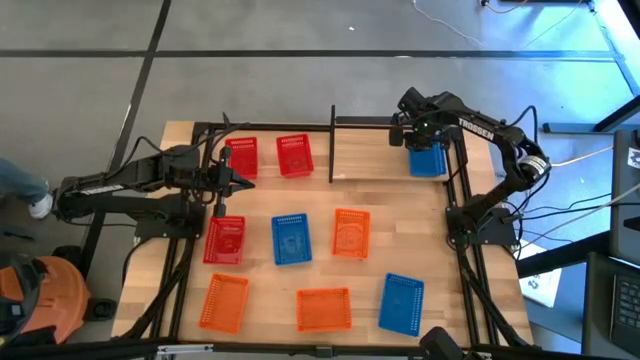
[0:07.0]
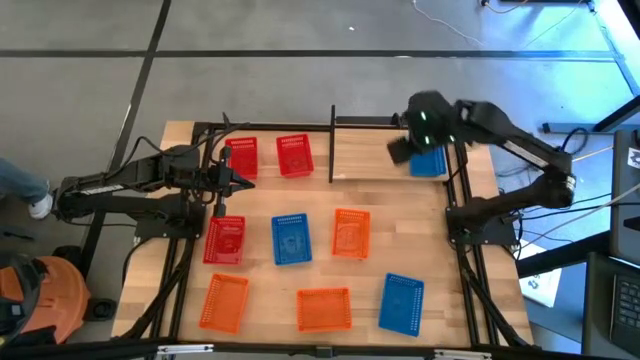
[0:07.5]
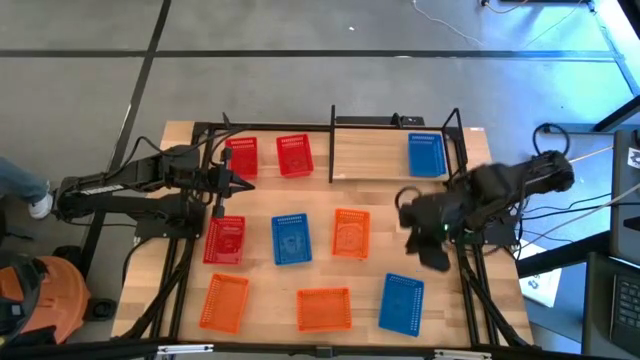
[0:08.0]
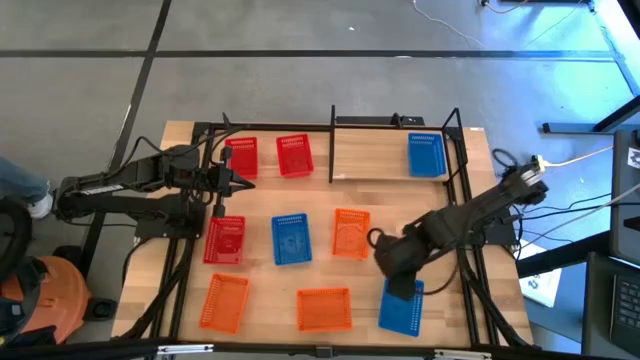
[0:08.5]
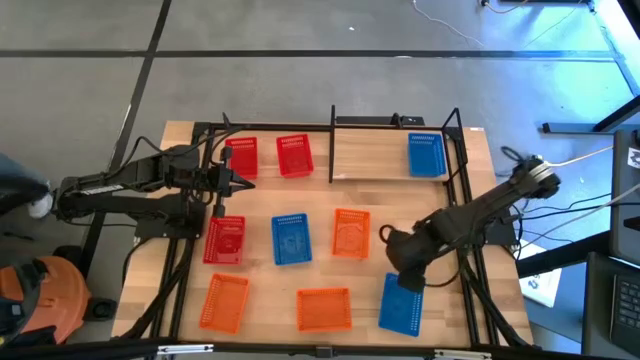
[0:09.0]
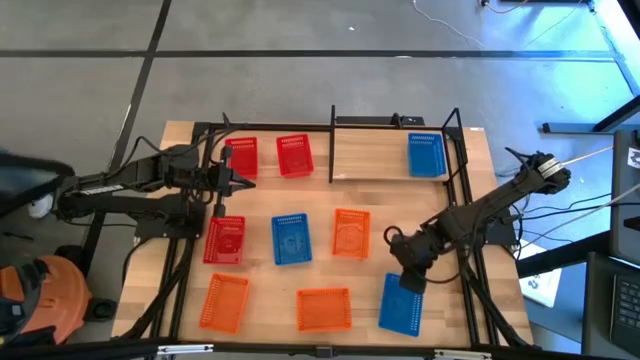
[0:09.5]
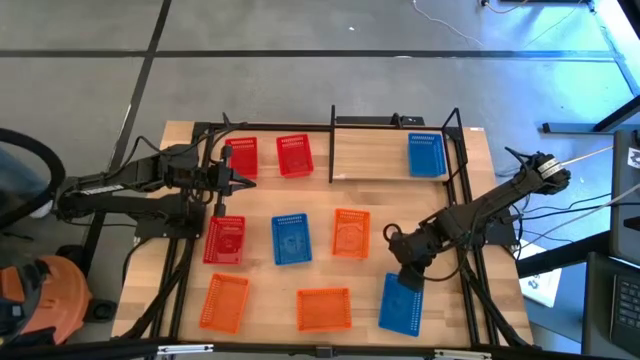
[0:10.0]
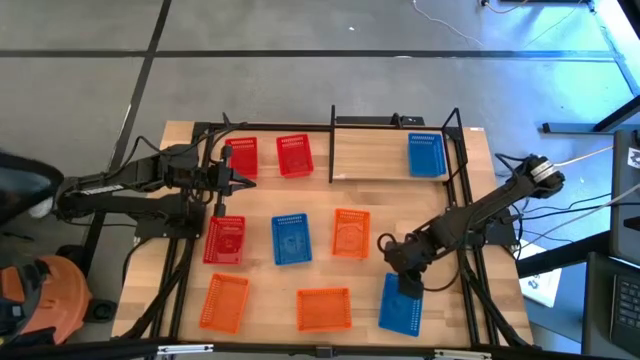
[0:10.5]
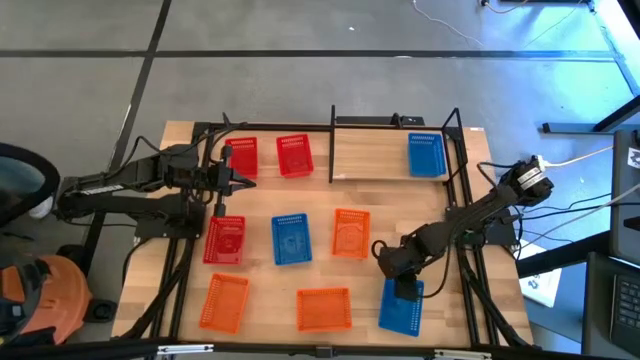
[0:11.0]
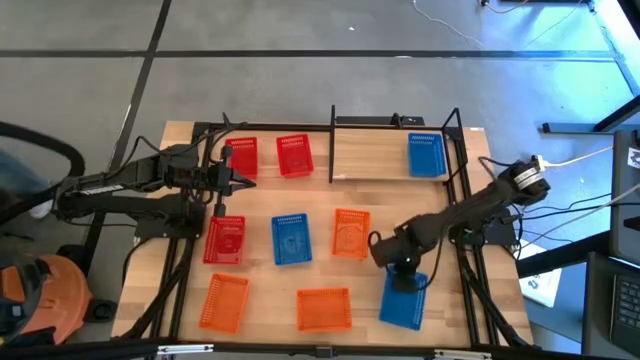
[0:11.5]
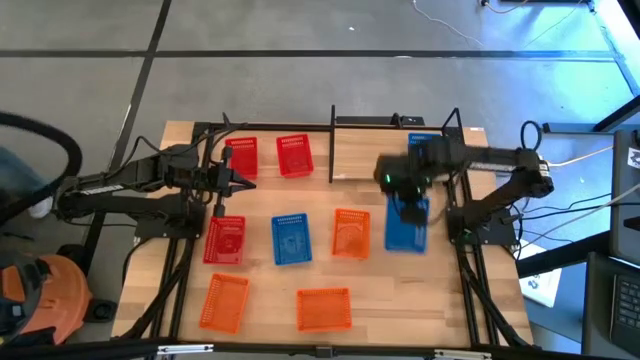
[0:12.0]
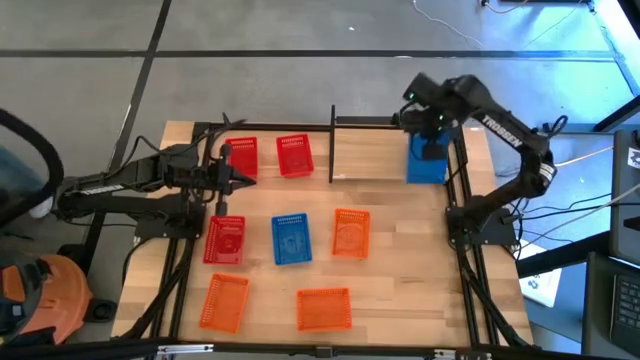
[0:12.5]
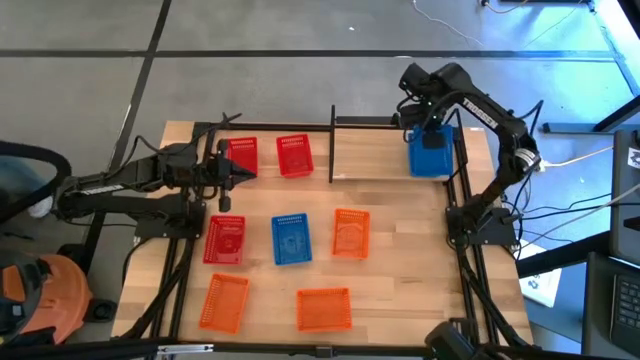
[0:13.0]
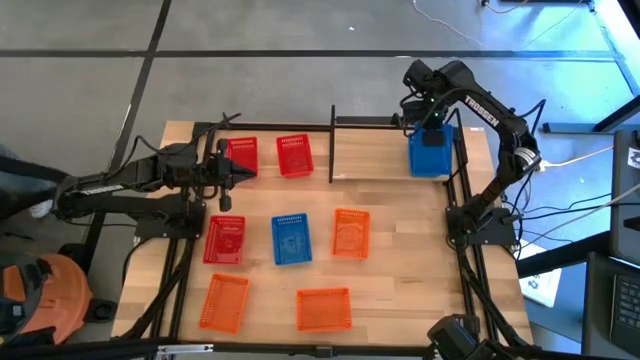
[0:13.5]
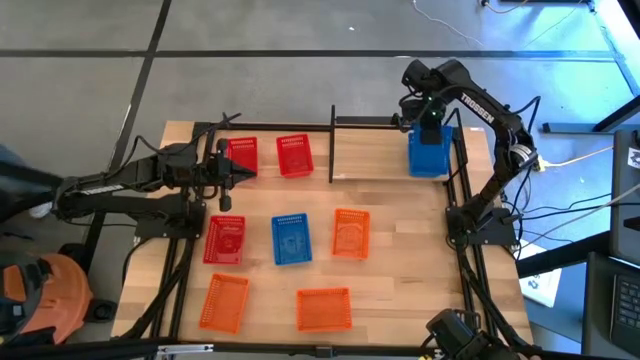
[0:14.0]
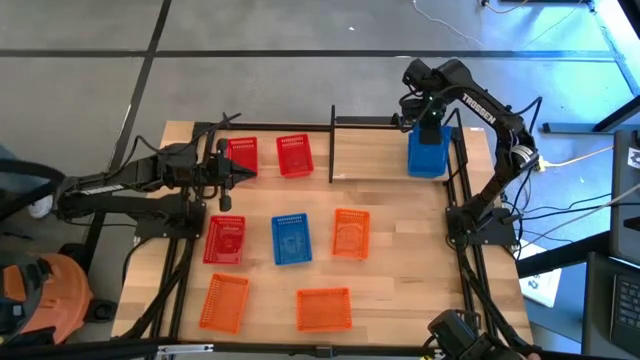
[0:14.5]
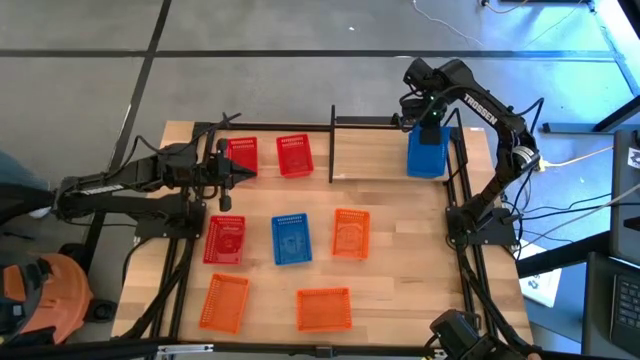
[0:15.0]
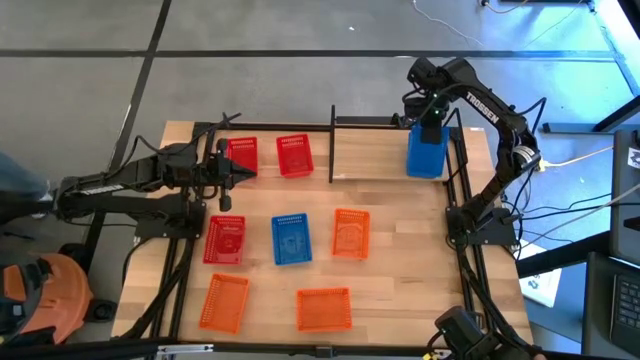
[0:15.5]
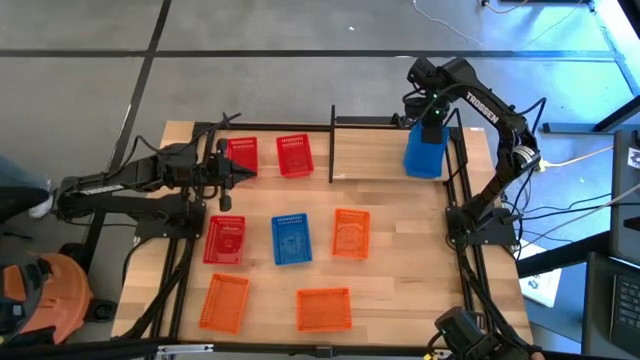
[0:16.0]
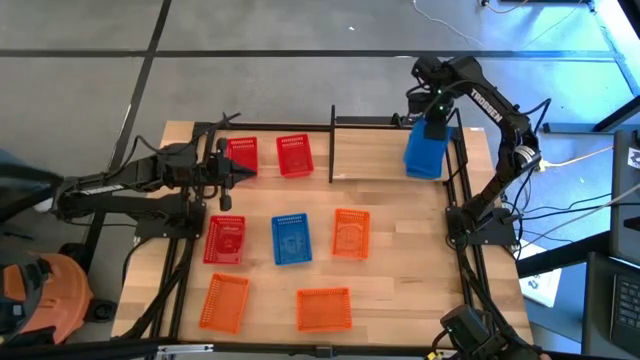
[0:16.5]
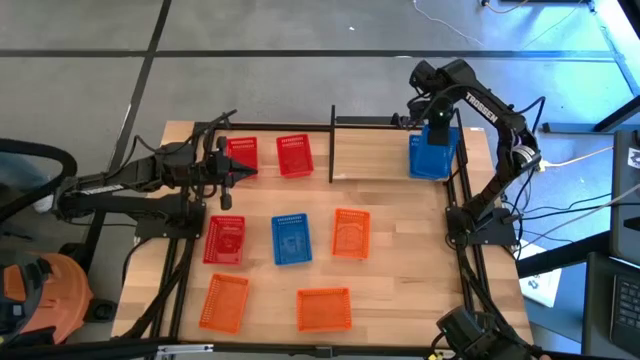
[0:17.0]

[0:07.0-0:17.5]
Task: Stack baskets on shelf by color
Stack the right blue basket on top of the blue basket on the shelf

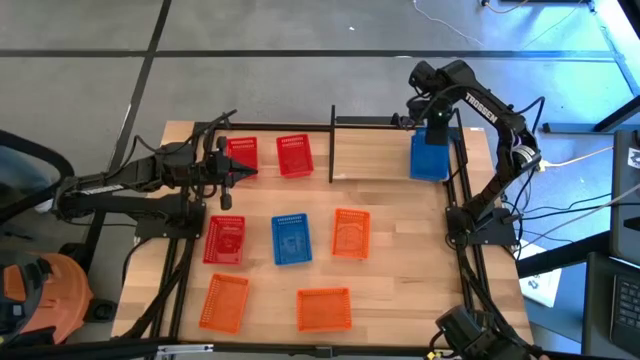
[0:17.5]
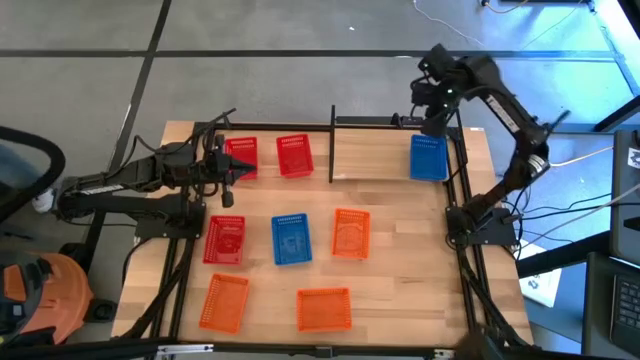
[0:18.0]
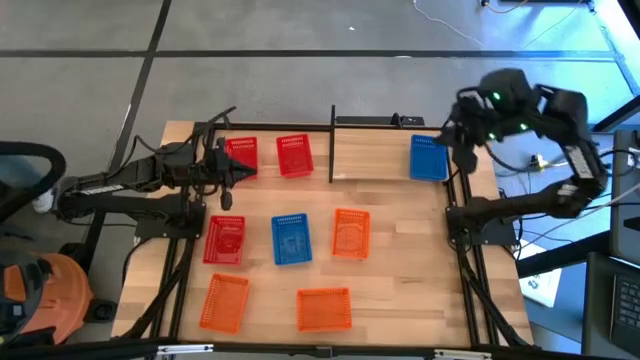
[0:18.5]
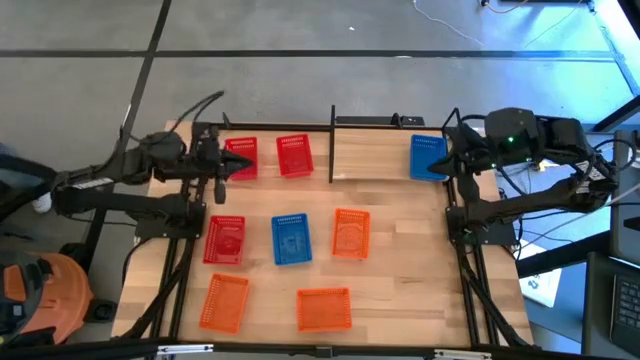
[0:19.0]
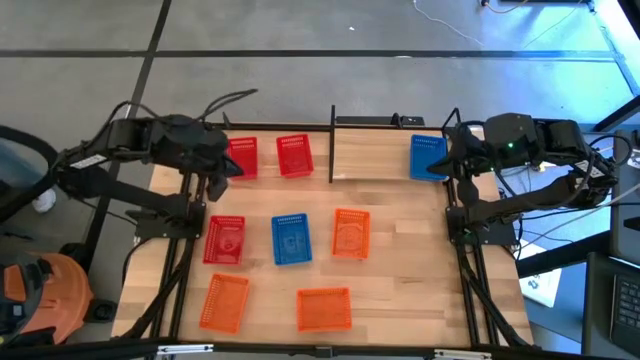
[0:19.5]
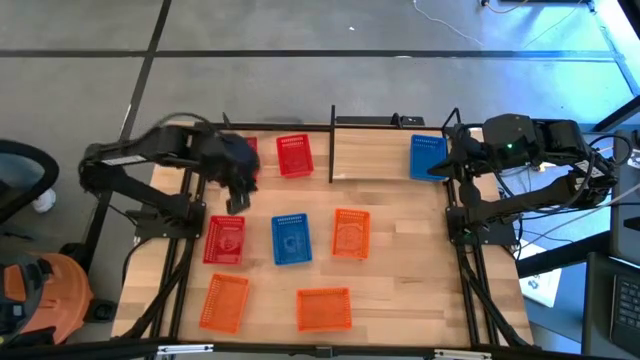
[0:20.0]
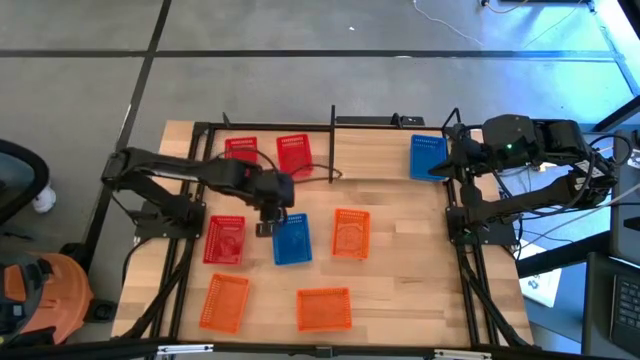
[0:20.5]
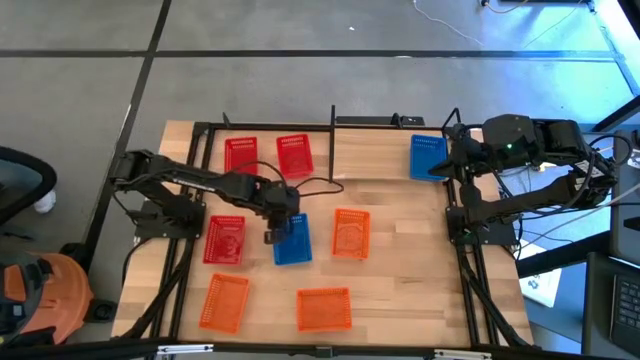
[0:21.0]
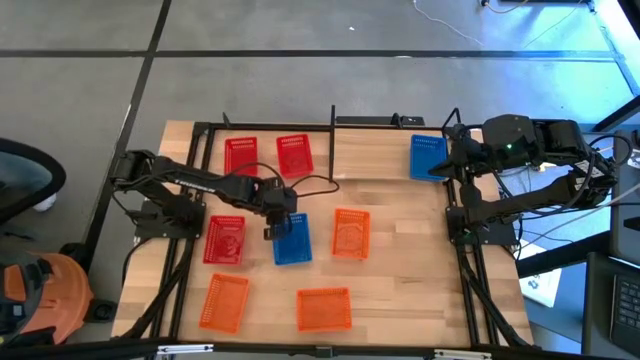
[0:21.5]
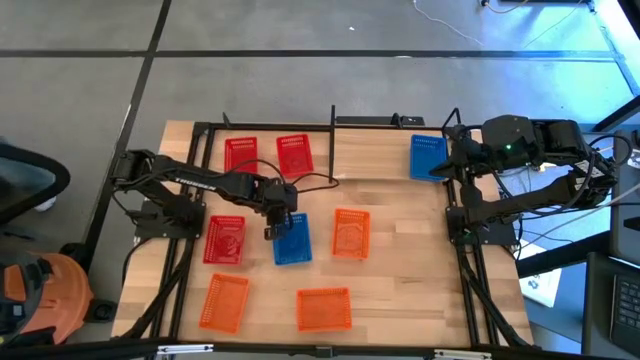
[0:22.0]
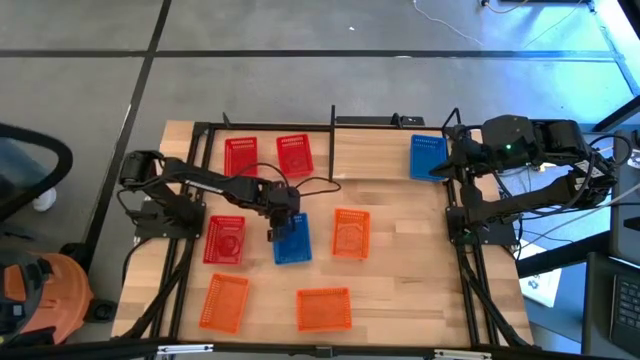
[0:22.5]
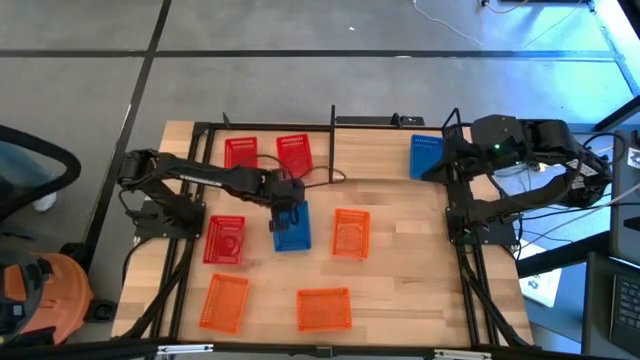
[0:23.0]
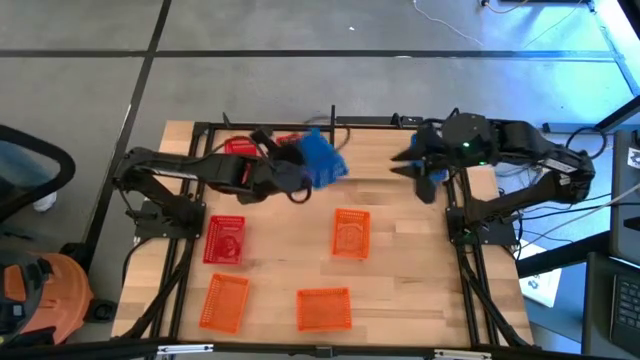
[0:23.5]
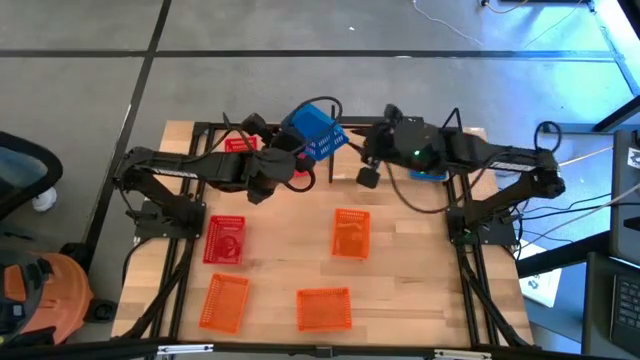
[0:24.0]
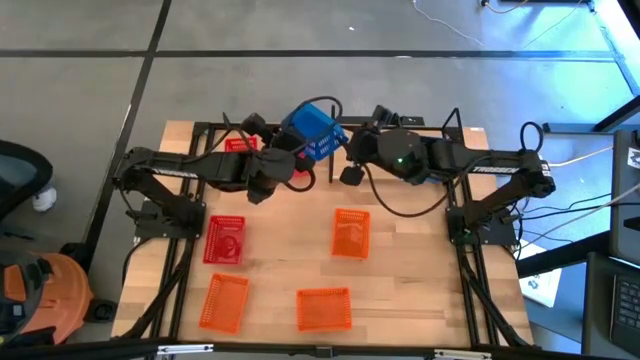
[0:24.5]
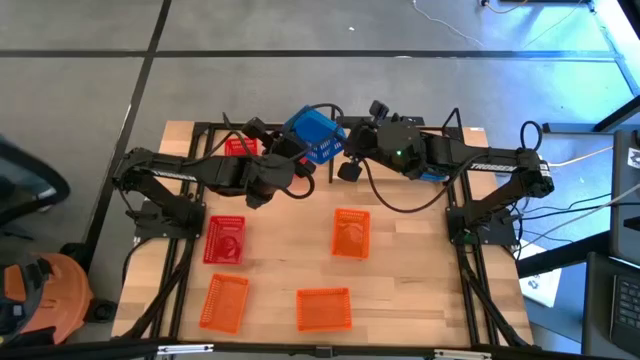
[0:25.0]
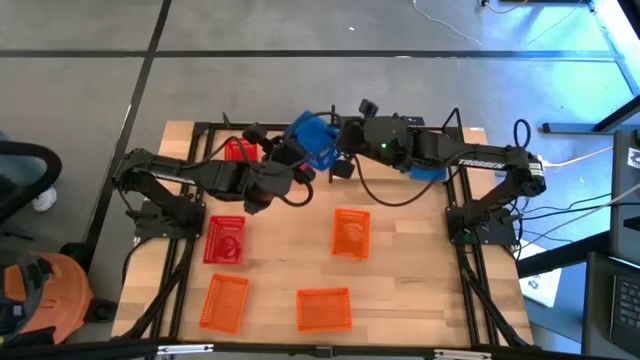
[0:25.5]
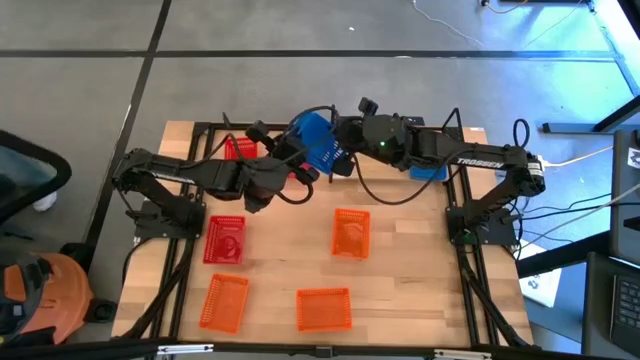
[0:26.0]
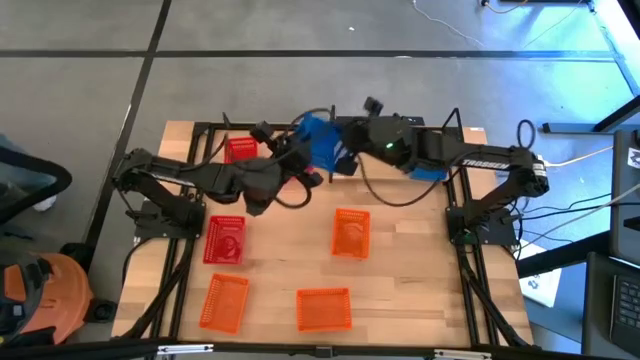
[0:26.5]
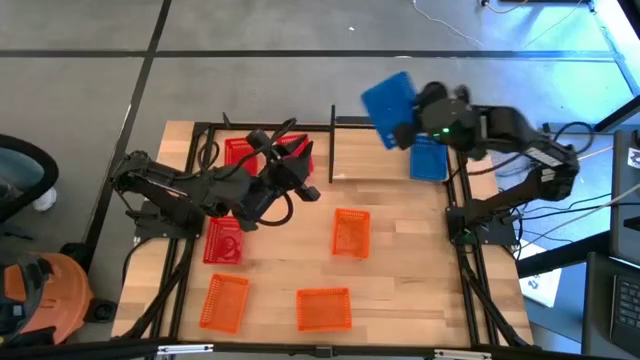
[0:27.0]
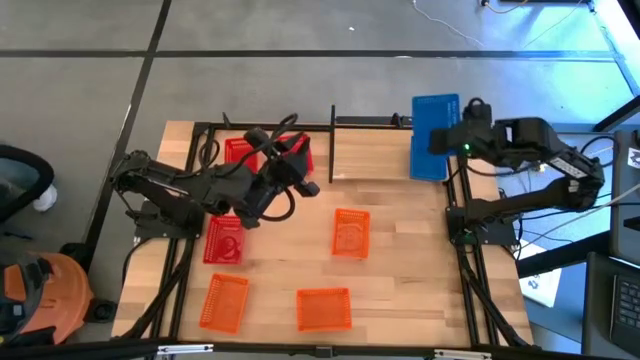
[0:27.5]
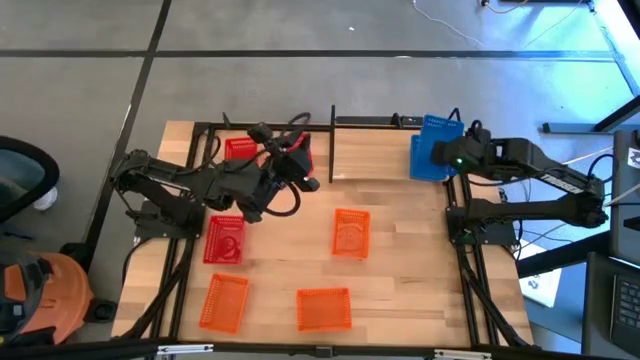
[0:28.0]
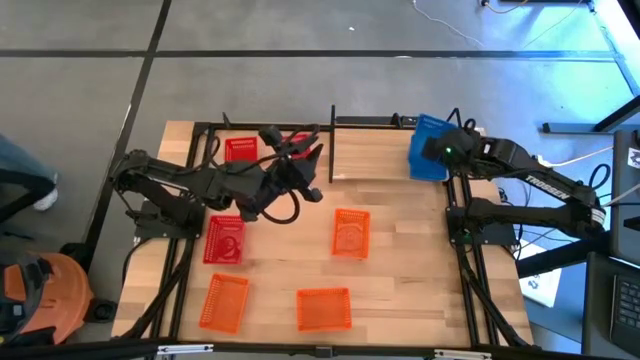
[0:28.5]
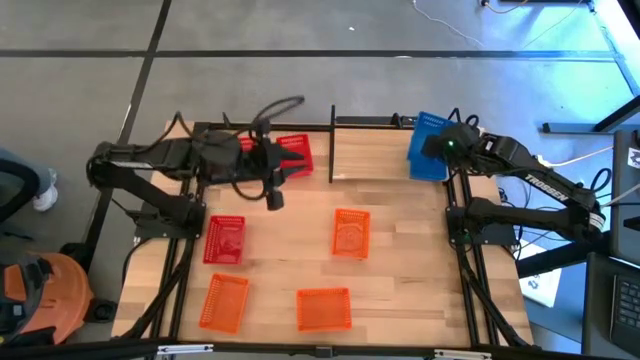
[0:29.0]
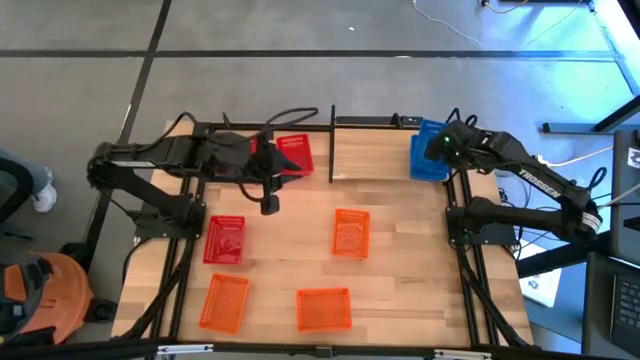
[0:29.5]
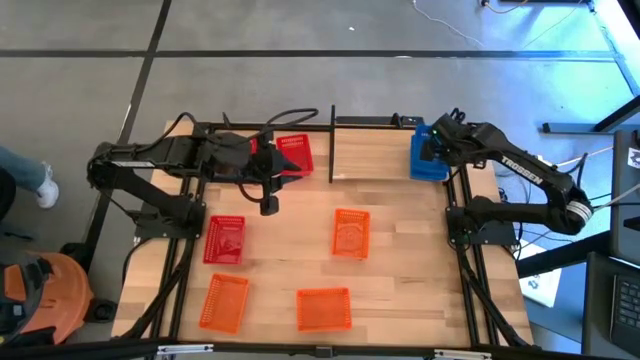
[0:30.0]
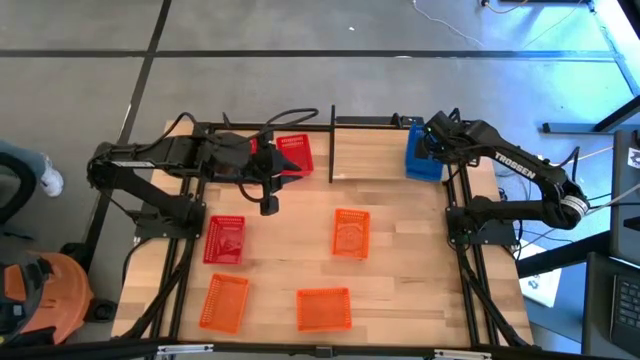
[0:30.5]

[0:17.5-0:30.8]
Stack the blue basket on top of the stacked blue basket on the shelf
